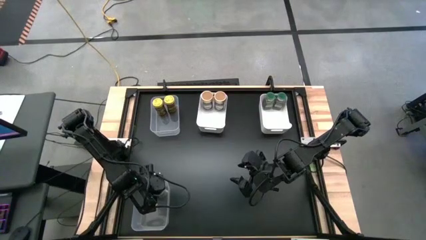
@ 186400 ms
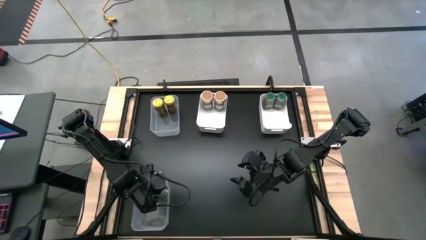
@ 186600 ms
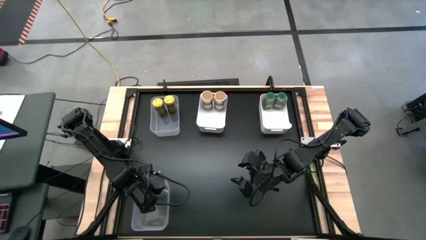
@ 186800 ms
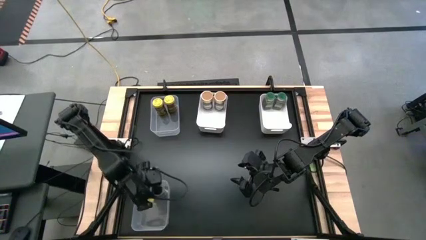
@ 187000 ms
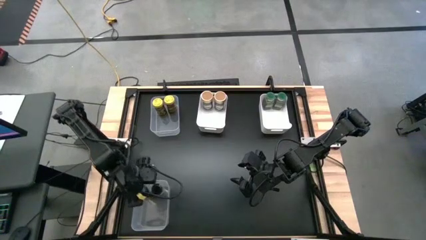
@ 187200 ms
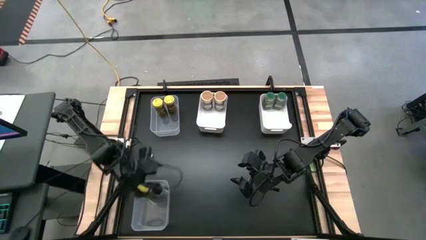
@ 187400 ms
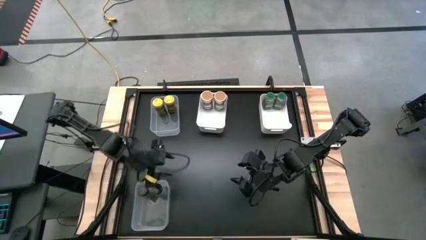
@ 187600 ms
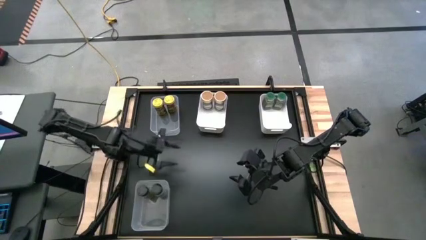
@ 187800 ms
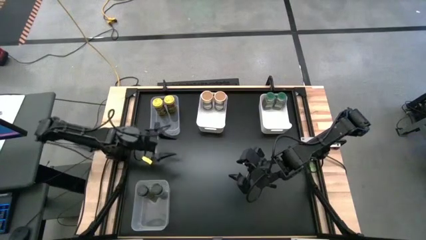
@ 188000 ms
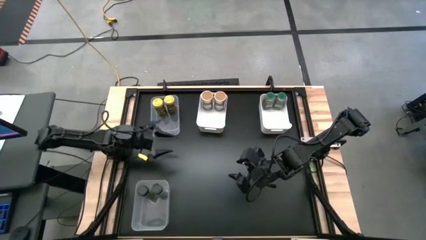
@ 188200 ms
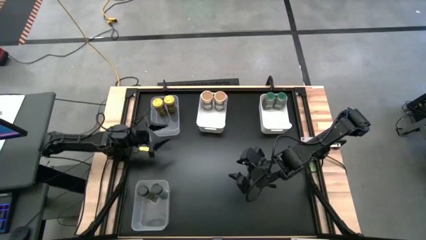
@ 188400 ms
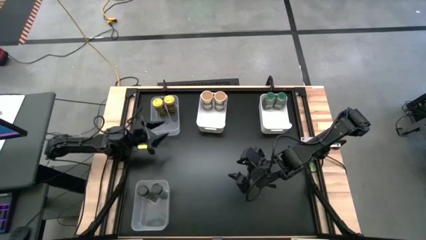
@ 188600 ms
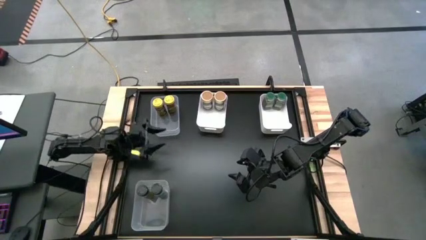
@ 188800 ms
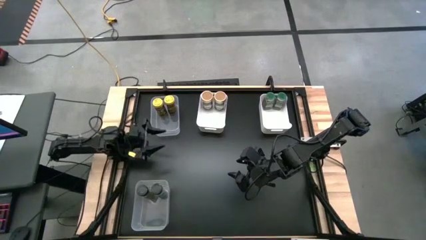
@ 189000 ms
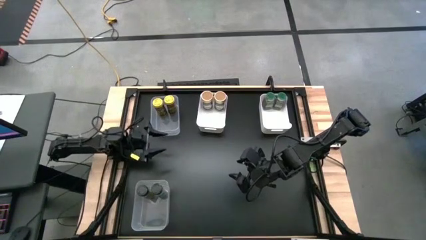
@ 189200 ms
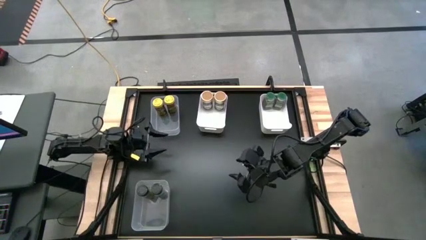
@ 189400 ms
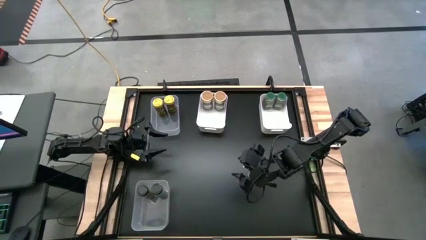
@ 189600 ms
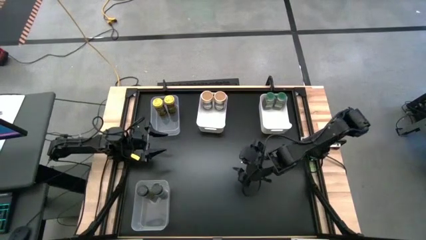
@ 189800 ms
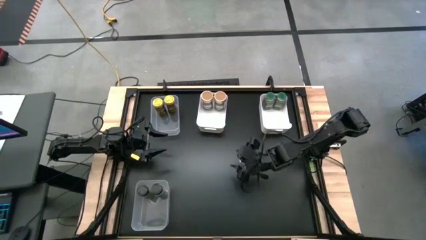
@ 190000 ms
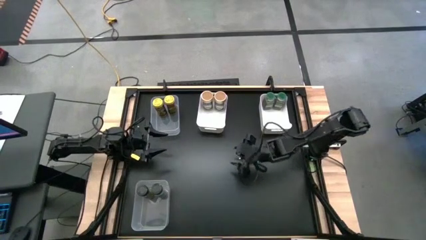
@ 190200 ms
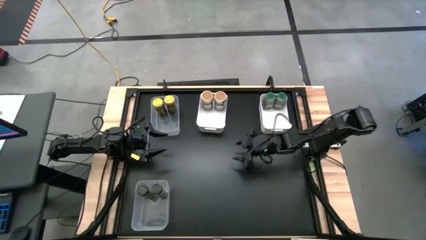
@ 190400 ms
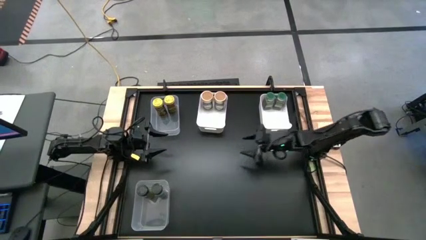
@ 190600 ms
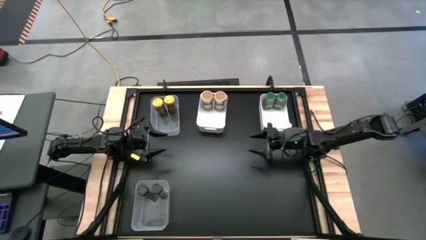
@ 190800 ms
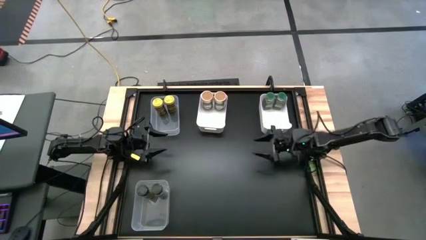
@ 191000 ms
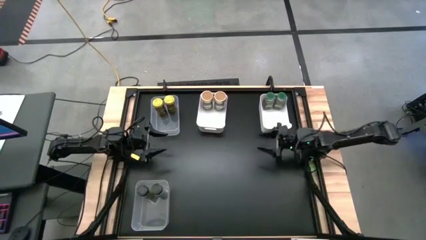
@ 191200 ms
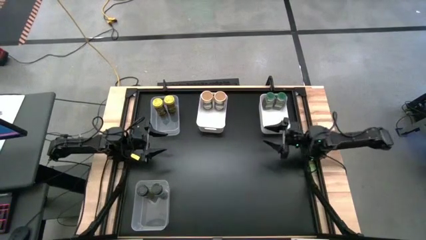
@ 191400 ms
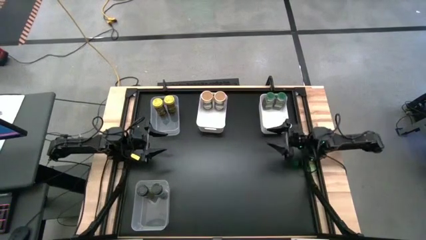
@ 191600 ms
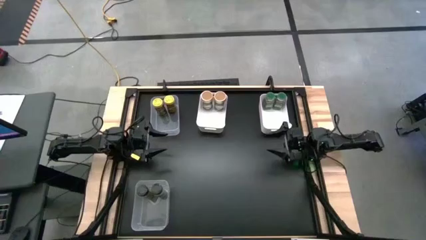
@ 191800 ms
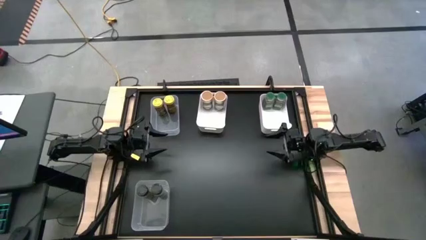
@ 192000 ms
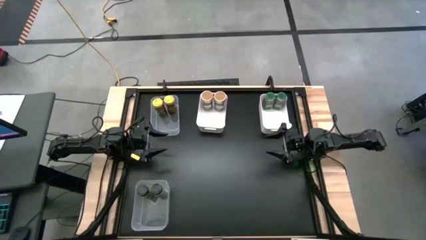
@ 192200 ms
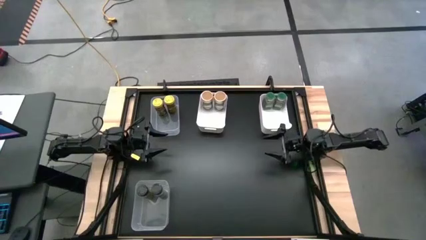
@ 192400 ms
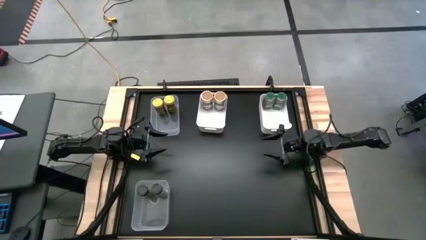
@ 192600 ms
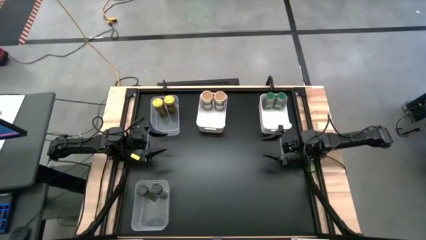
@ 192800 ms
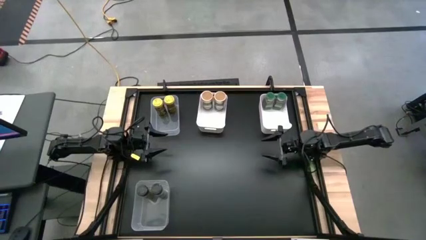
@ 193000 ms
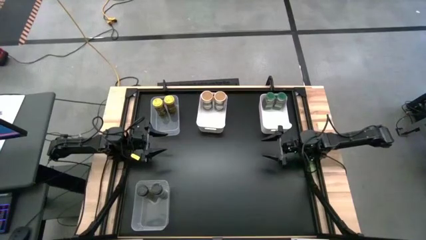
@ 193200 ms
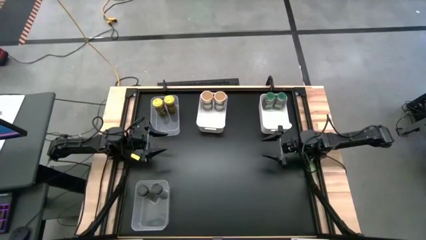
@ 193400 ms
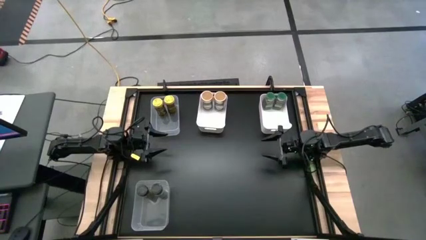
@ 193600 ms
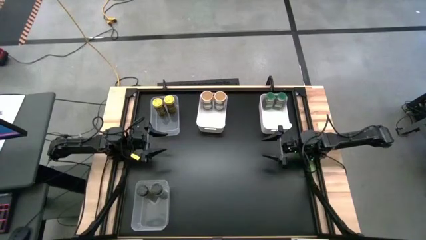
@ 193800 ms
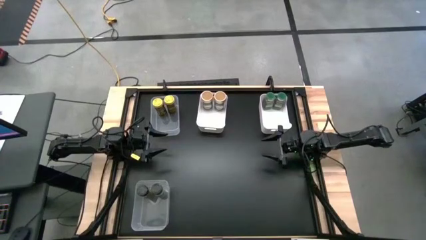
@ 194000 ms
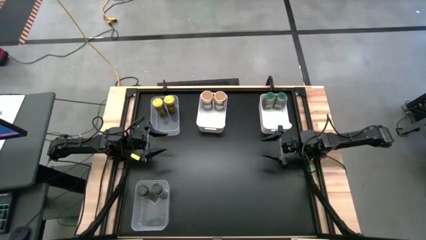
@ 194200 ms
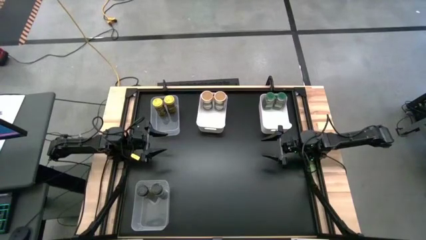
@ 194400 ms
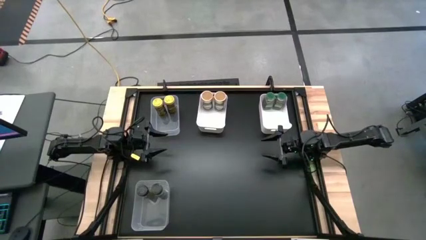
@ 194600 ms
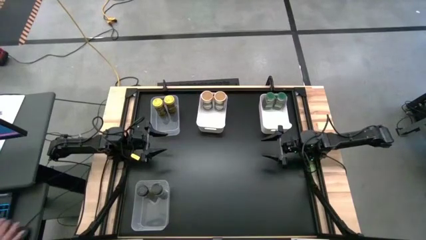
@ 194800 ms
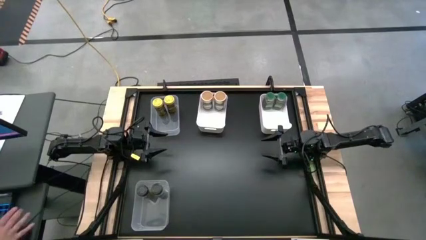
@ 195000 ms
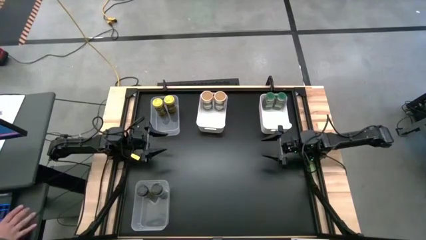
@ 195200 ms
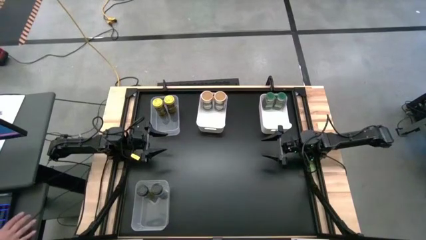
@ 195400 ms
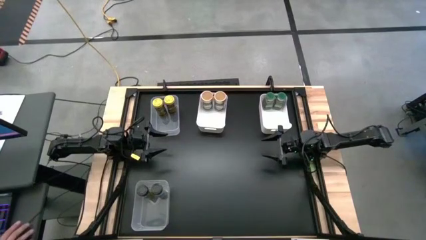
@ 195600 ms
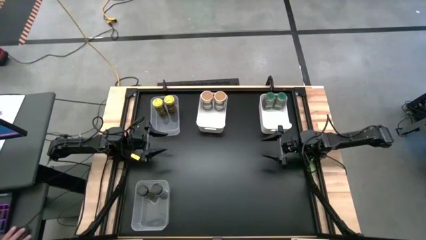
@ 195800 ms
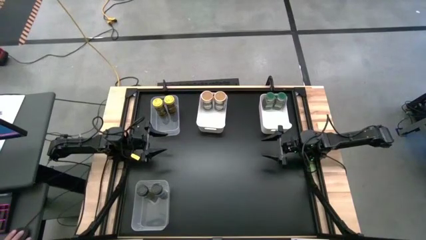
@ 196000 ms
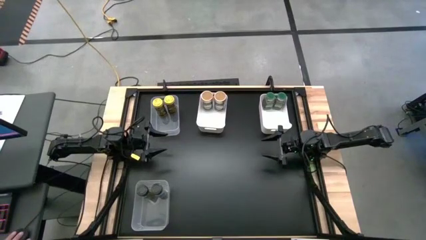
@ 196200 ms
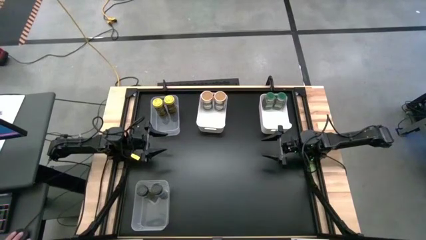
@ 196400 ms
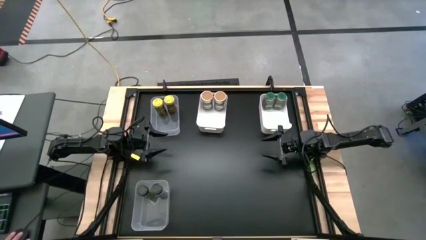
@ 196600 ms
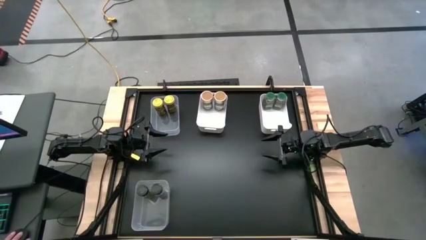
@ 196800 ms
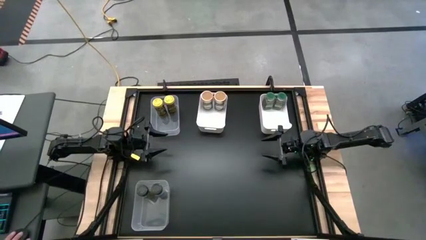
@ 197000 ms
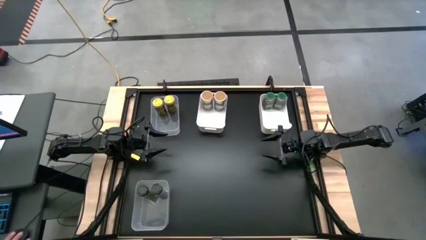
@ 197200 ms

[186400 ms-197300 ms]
Task: Sort spices by type
Return to Home Position

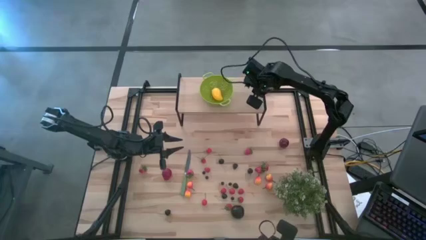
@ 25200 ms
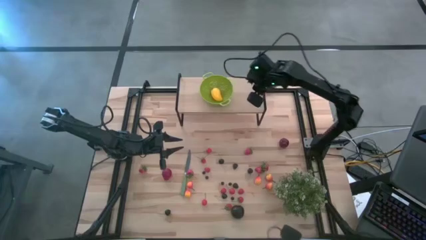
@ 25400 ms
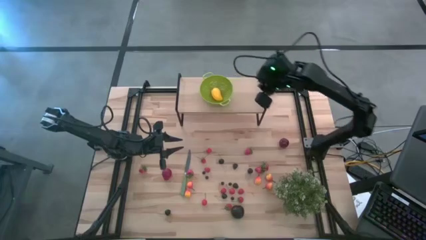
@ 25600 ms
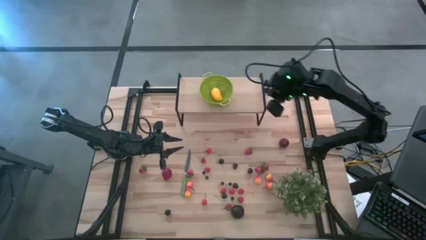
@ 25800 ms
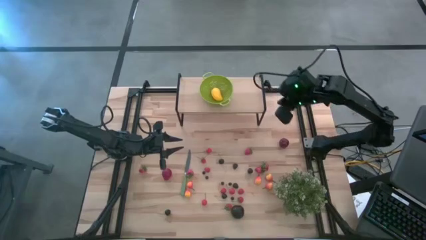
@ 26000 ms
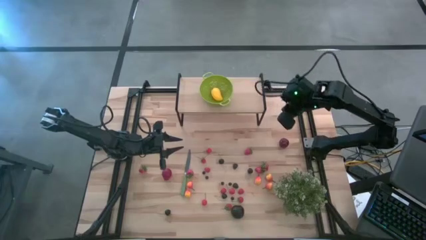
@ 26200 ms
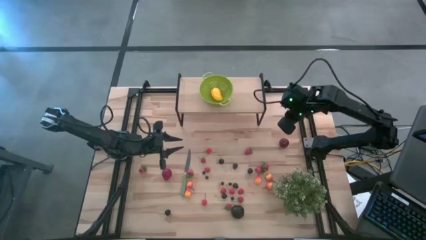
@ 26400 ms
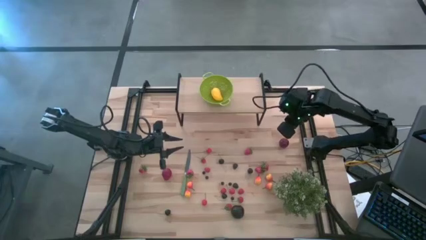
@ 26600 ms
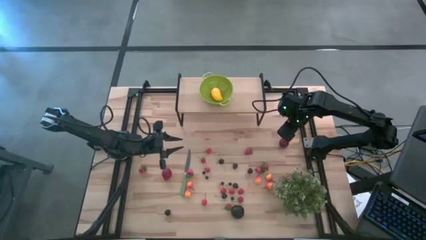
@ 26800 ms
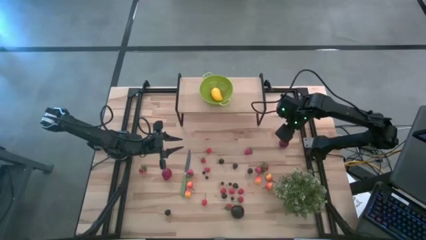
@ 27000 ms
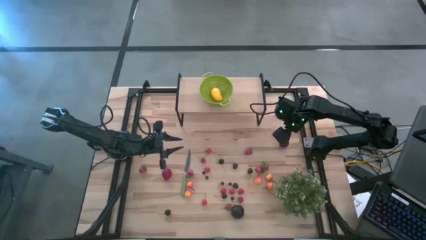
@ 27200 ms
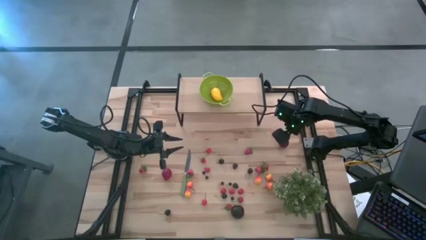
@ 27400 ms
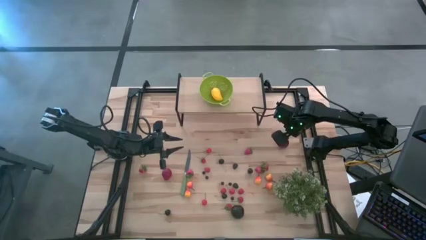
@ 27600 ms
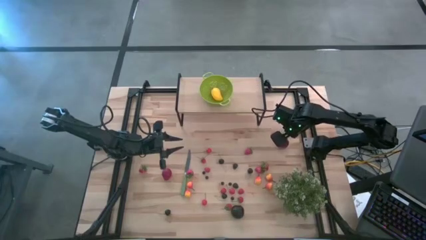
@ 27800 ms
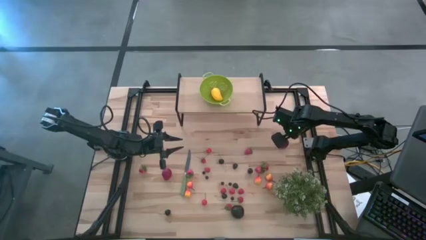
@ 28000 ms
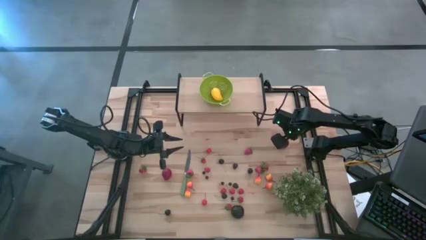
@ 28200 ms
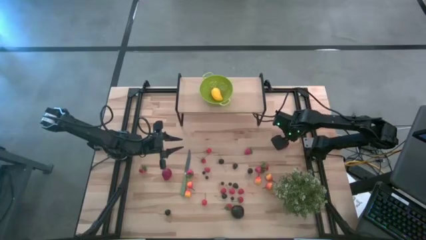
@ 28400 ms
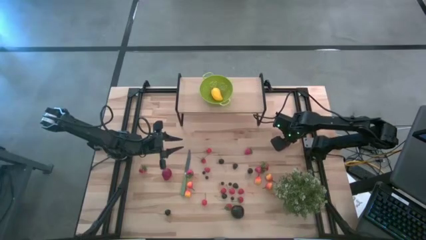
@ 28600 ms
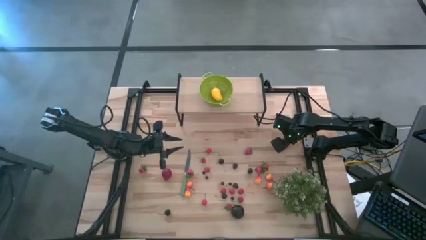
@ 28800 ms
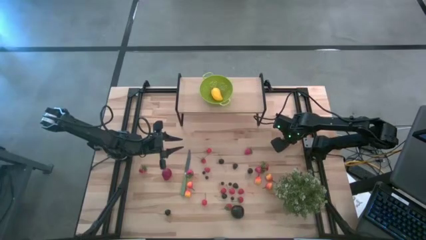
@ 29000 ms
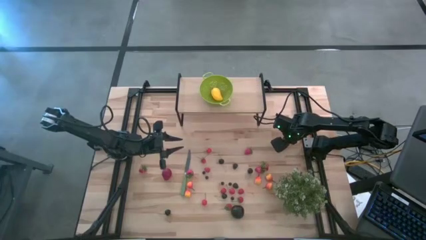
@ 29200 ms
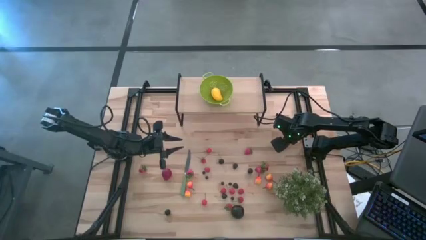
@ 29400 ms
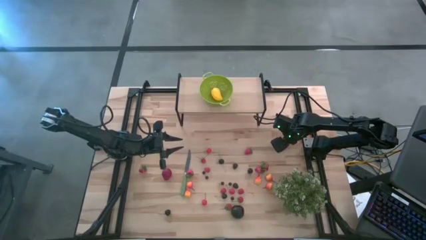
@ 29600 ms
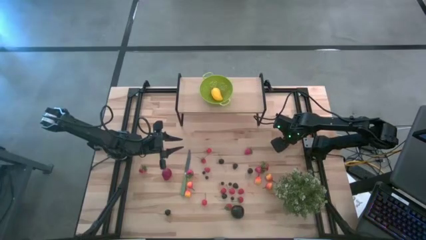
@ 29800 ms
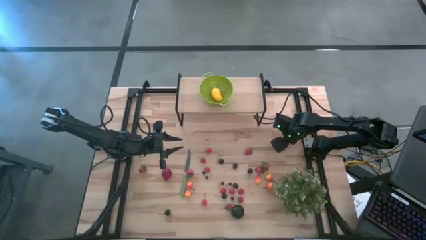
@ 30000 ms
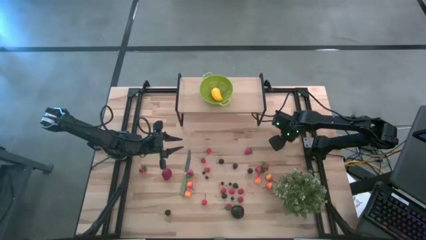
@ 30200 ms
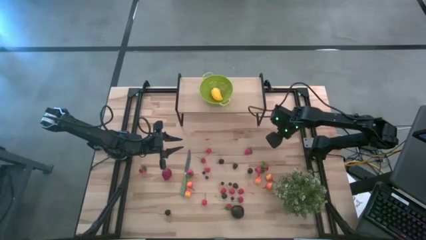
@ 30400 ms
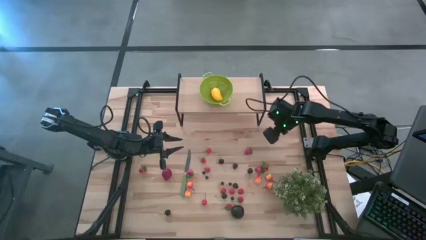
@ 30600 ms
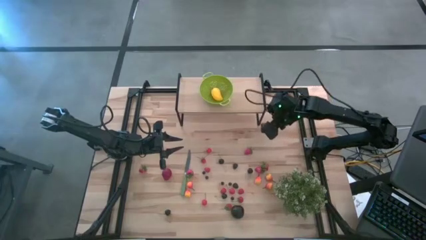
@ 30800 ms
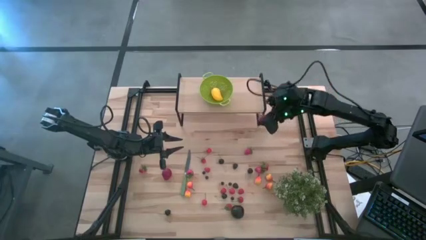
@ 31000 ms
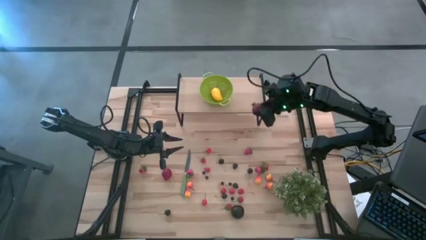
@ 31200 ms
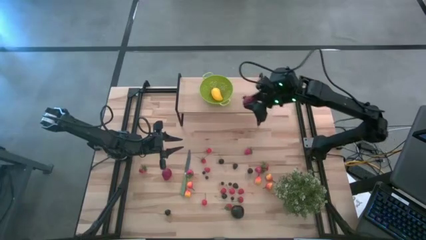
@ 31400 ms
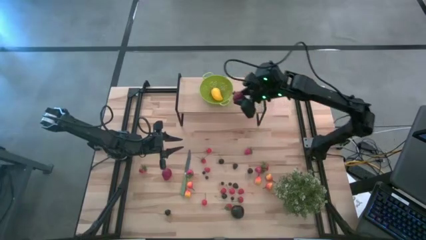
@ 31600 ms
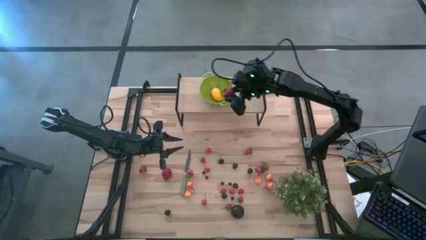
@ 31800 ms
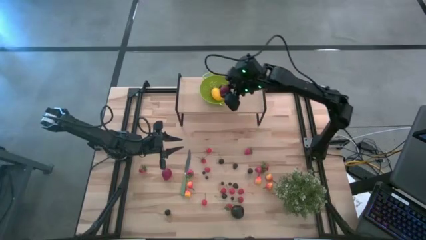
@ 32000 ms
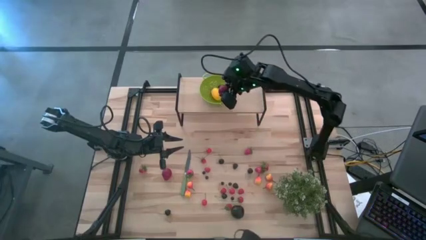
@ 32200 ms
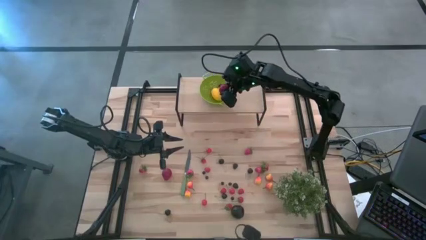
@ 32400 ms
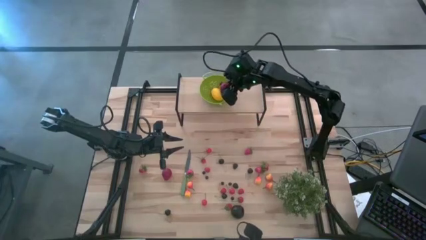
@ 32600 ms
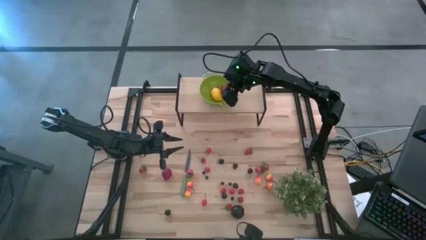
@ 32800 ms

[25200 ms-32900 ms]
Task: Pick & Place Fruit
Put the pomegranate into the green colander on the shelf
